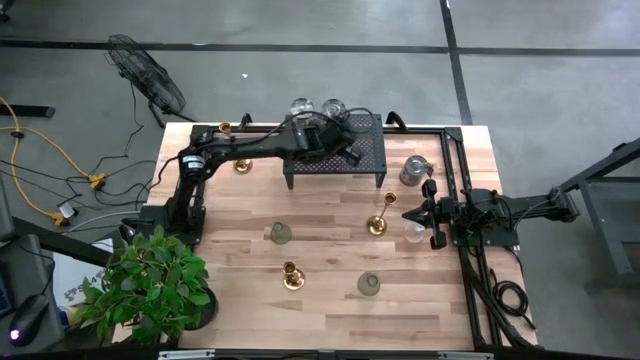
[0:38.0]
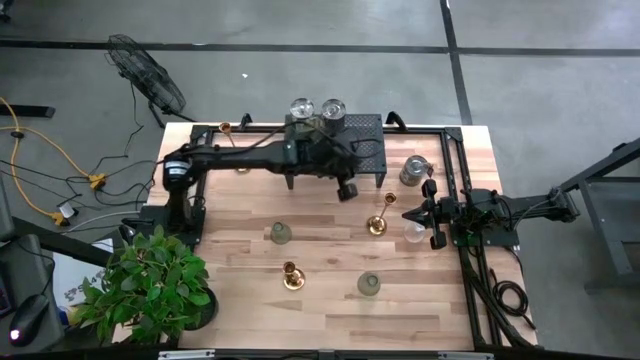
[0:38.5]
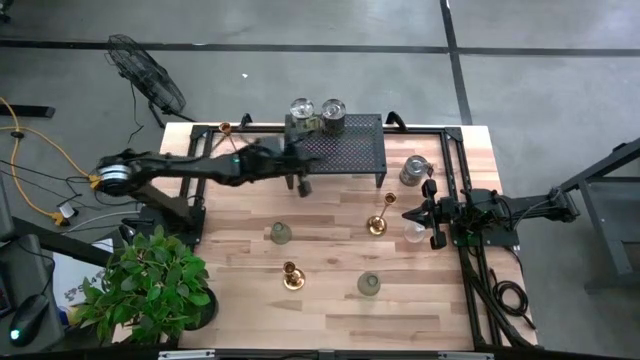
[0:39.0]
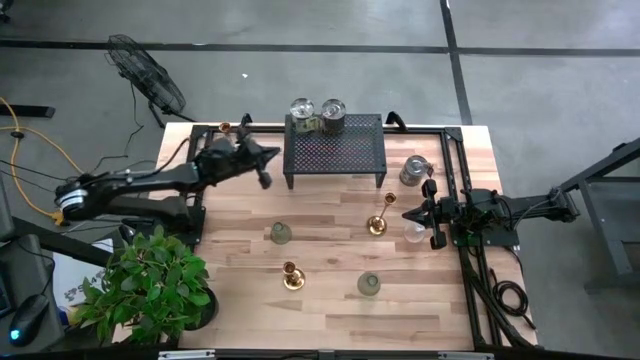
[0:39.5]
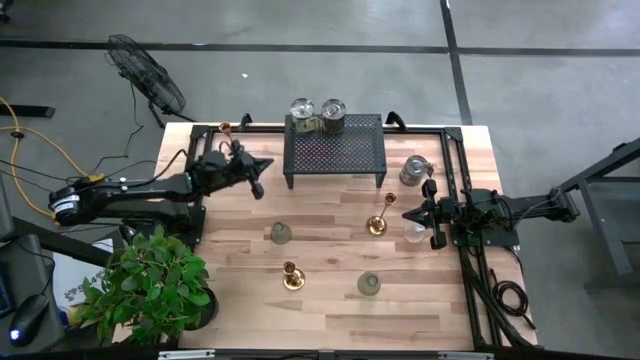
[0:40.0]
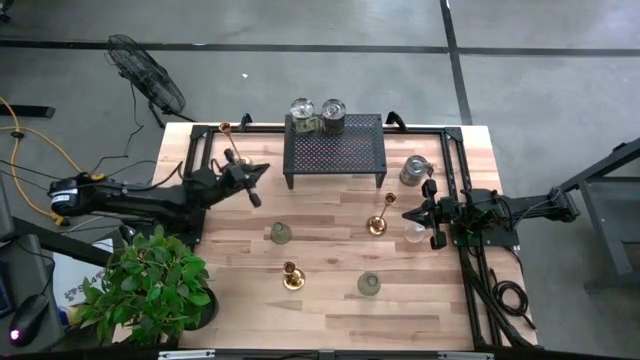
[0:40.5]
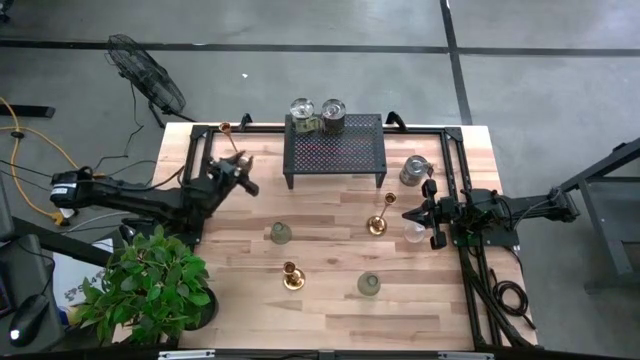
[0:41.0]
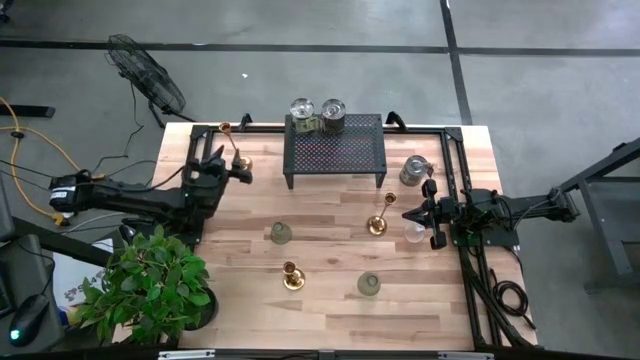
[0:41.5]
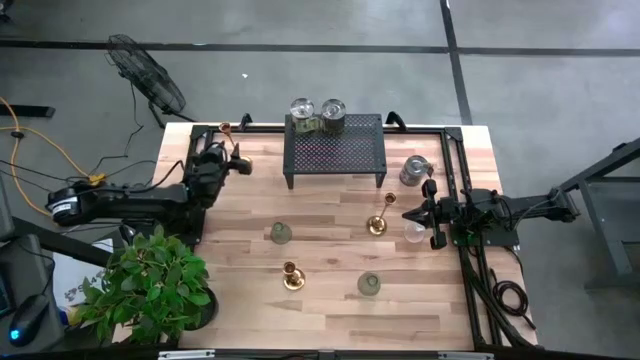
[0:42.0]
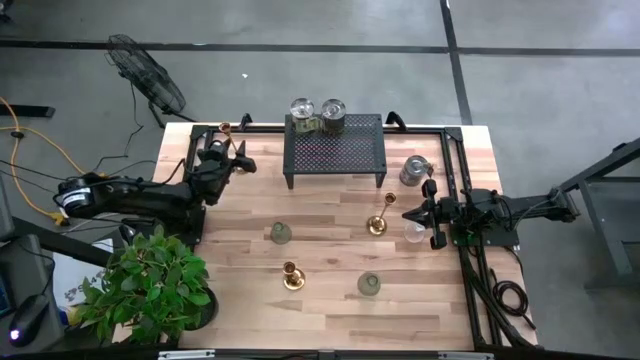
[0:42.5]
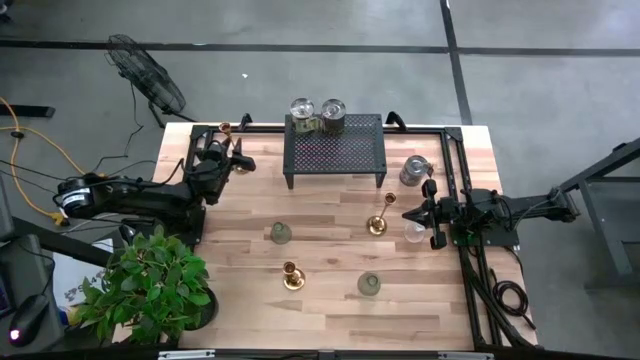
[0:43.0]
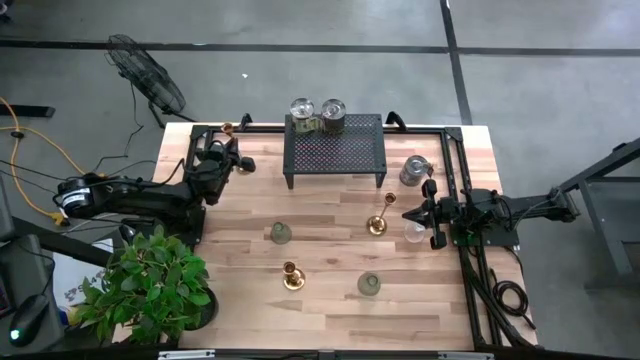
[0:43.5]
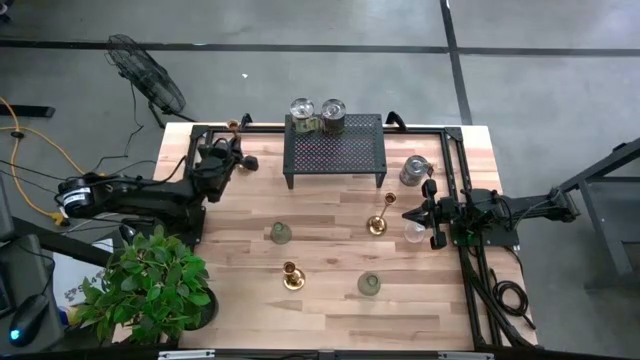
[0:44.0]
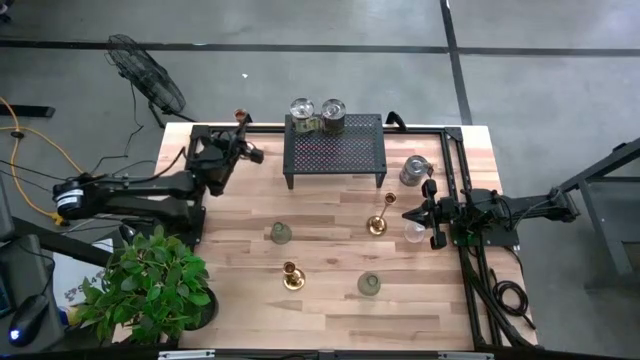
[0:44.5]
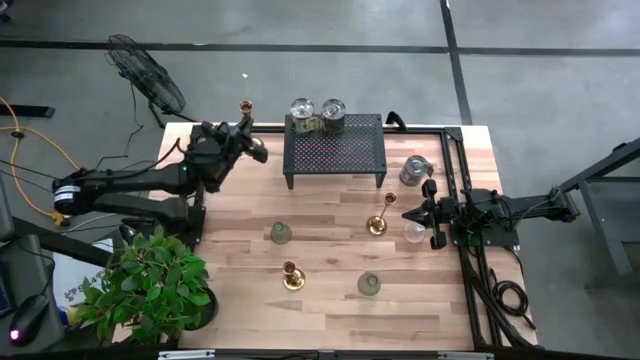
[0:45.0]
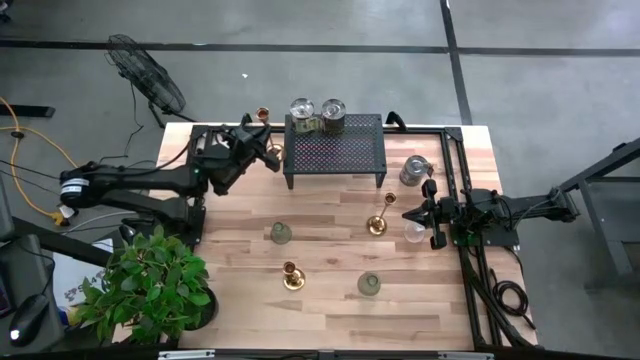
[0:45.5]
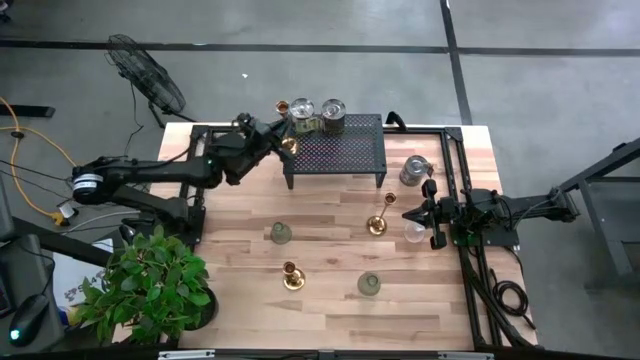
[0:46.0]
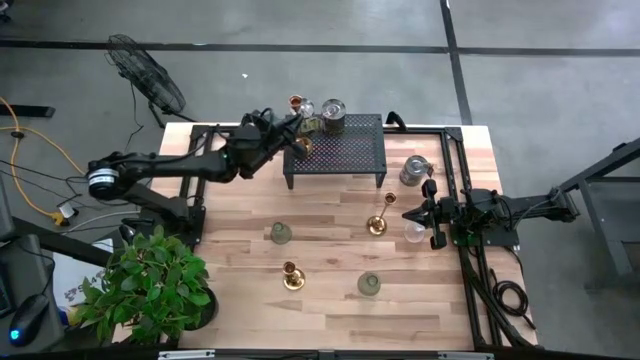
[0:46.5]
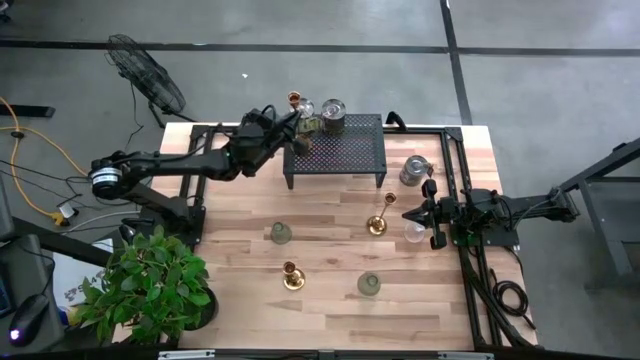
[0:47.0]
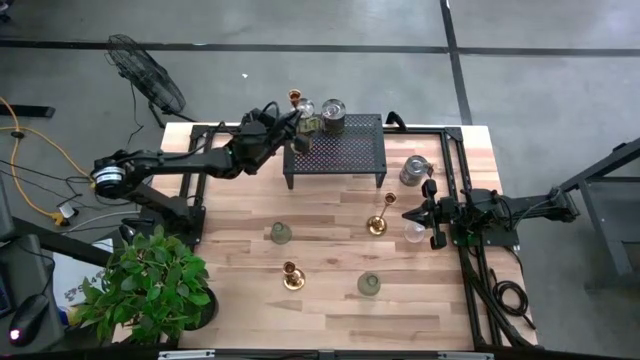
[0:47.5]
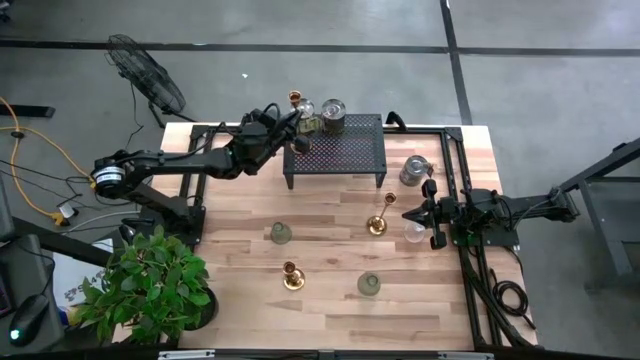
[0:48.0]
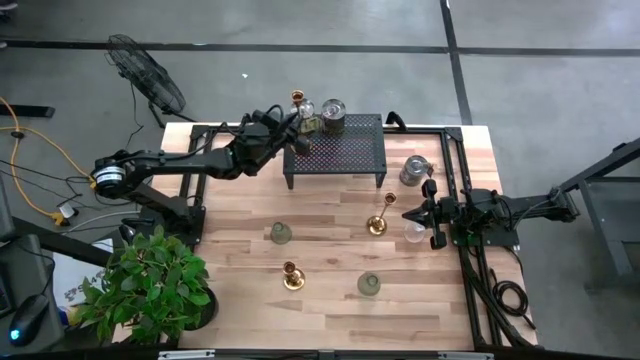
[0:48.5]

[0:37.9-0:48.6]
Task: Stock candles on shelf
Put the top gold candle holder on the shelf

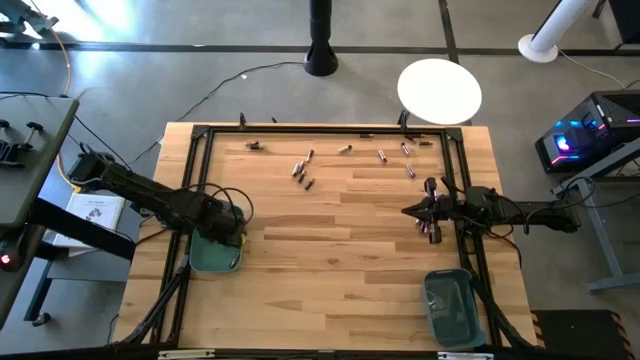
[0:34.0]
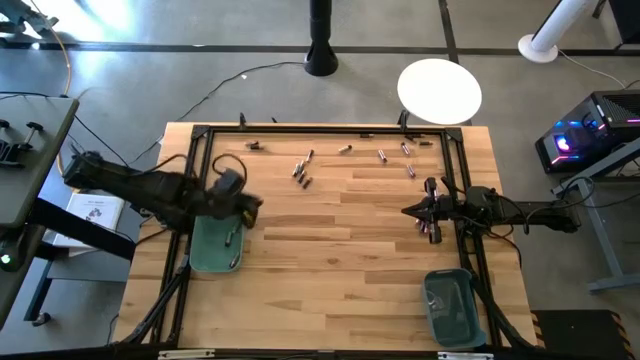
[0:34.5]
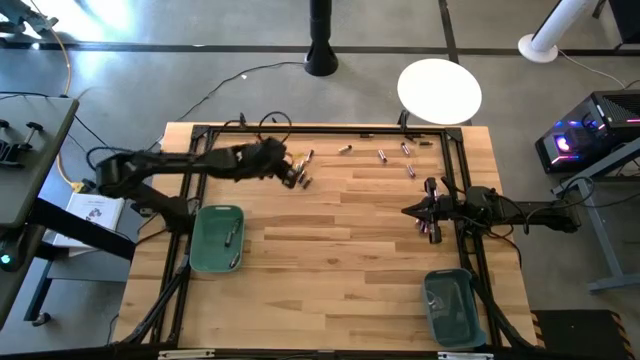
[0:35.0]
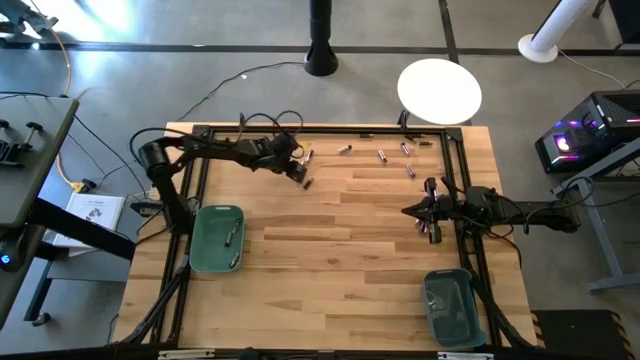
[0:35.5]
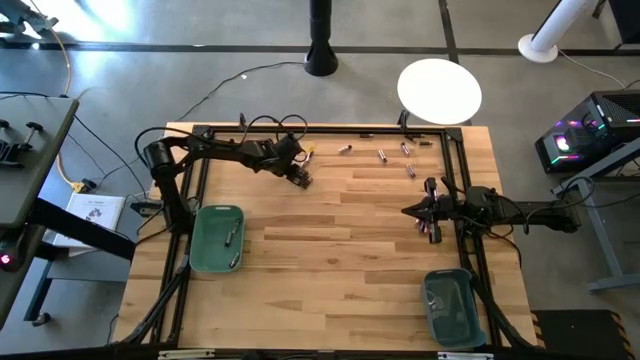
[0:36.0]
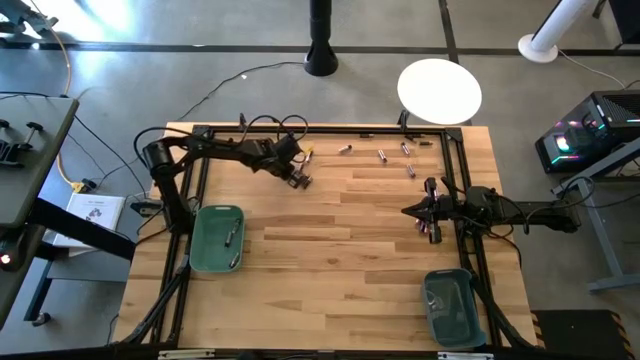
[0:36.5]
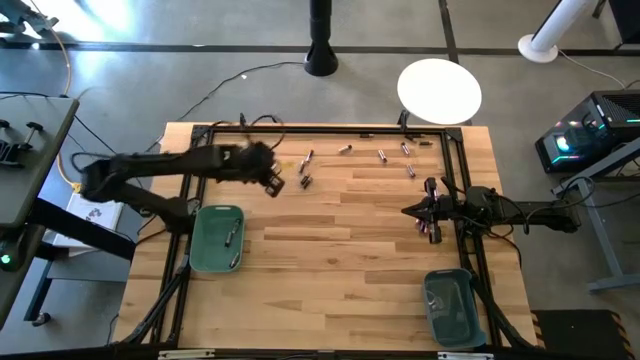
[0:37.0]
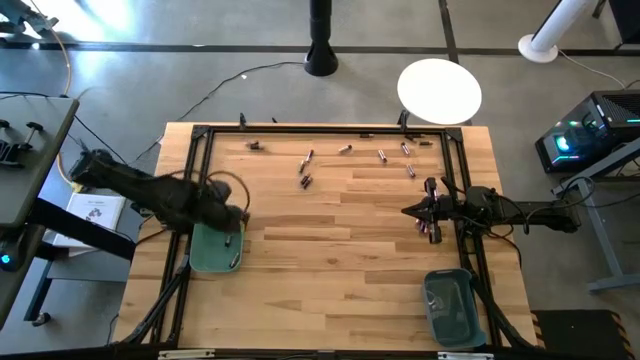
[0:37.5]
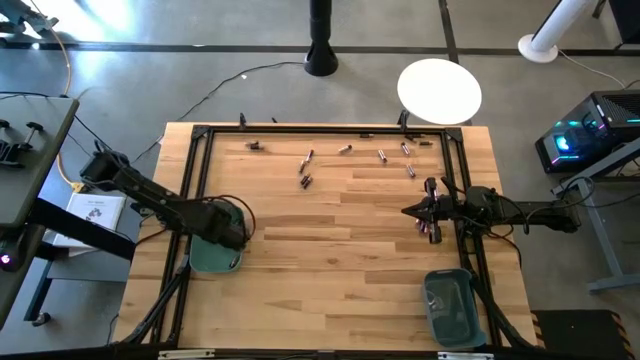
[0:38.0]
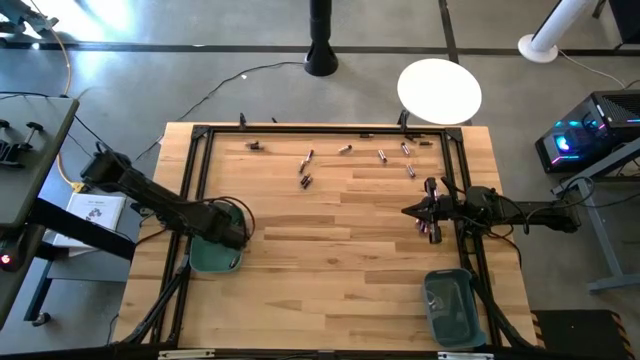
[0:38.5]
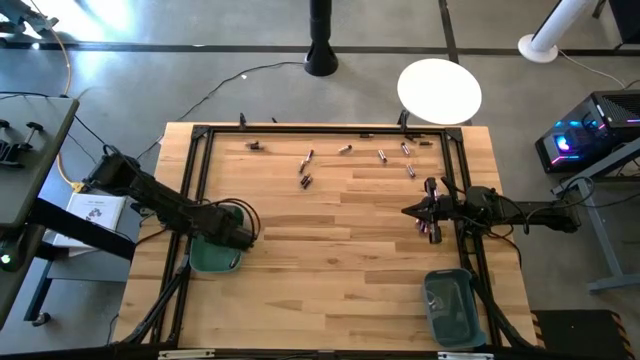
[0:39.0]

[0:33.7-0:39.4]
Task: Sort batteries
Put the silver battery into the green bin

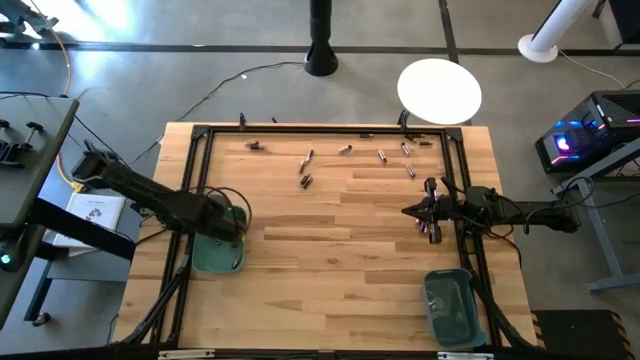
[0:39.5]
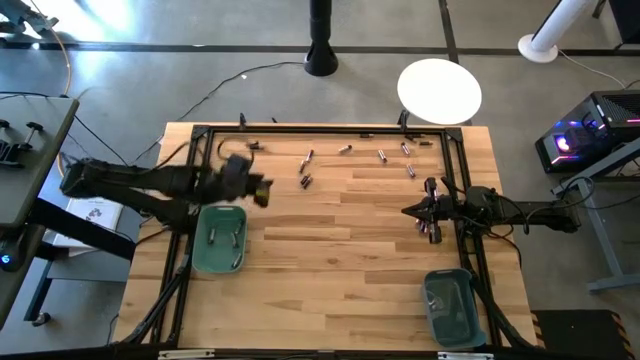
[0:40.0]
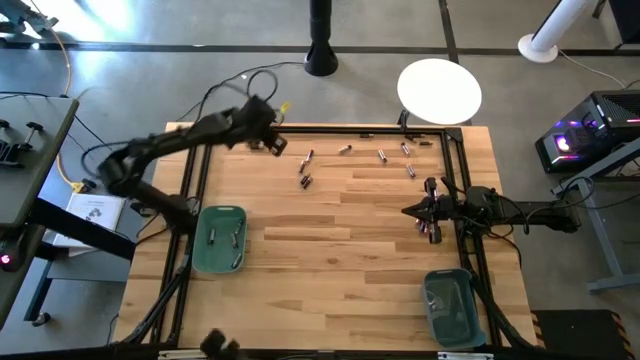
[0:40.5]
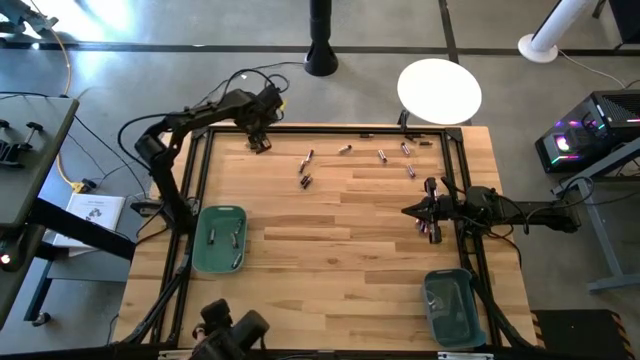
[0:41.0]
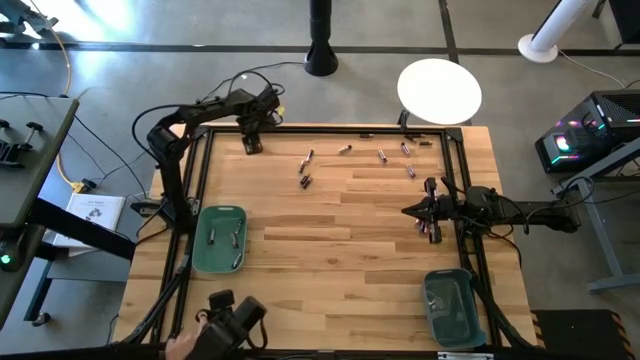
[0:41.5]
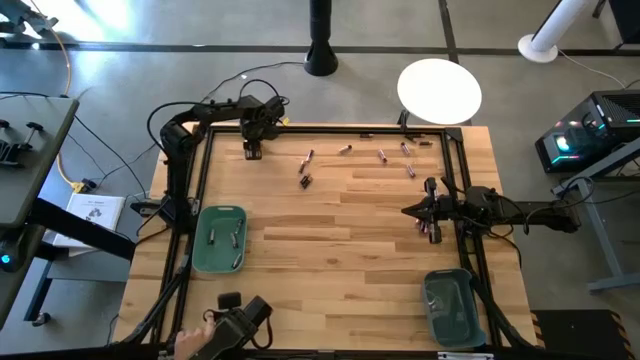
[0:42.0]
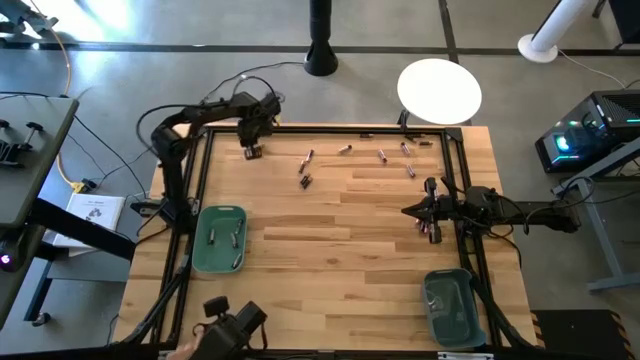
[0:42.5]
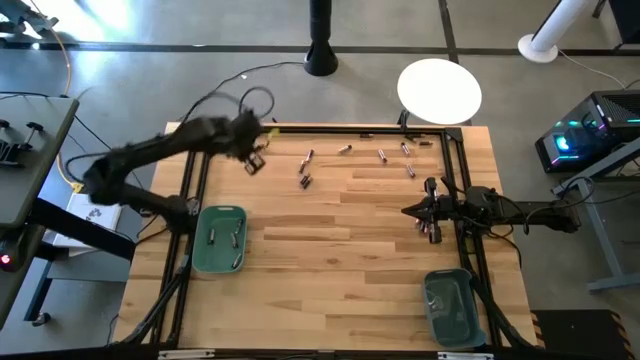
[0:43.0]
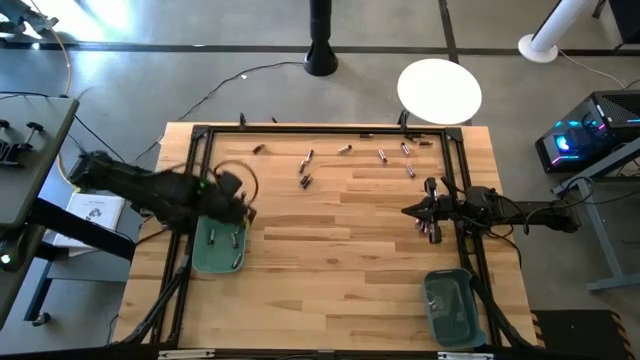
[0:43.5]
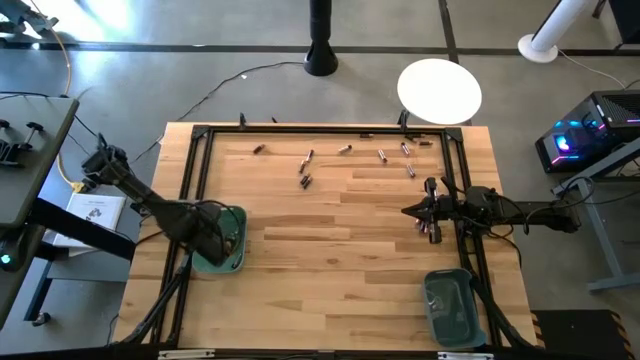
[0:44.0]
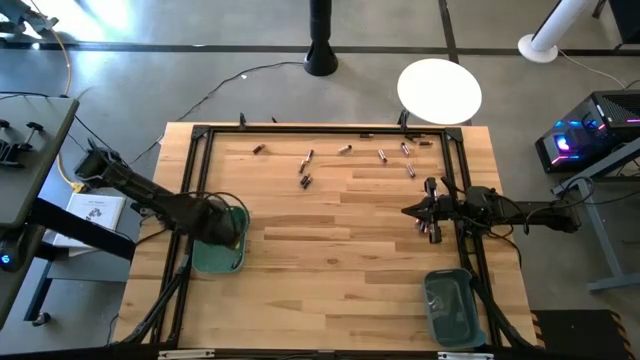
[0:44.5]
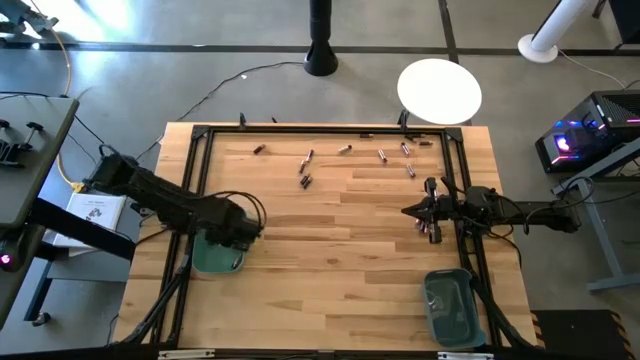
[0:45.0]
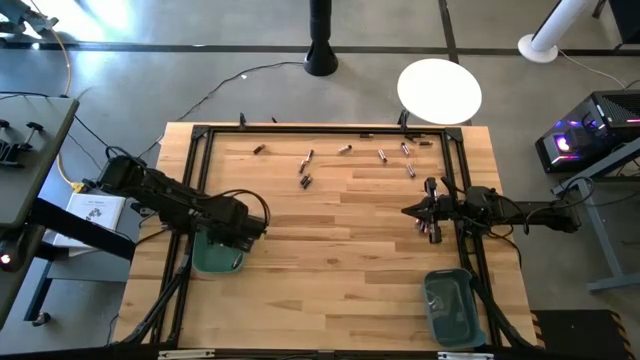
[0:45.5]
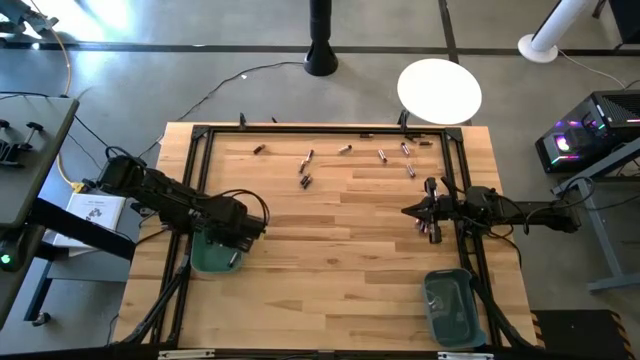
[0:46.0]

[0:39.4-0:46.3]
Put the silver battery into the green bin
